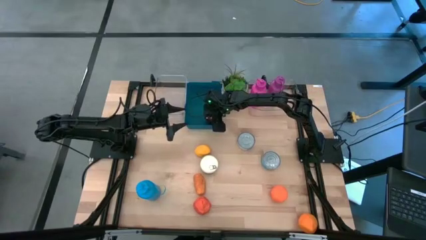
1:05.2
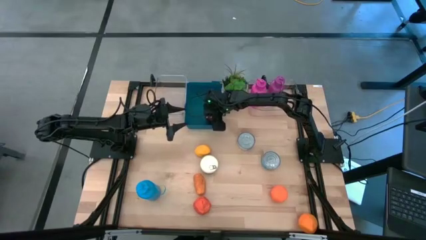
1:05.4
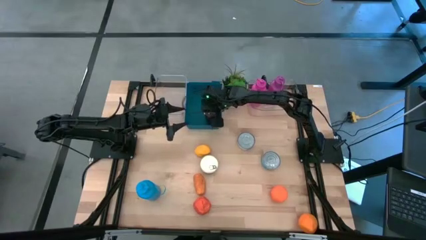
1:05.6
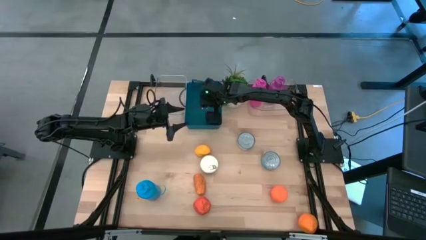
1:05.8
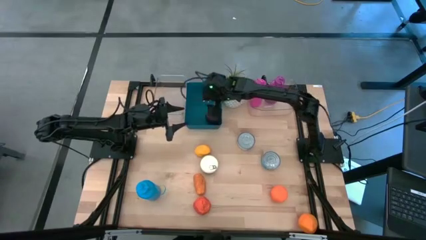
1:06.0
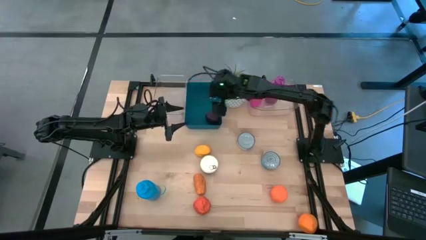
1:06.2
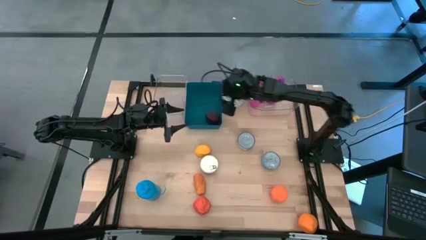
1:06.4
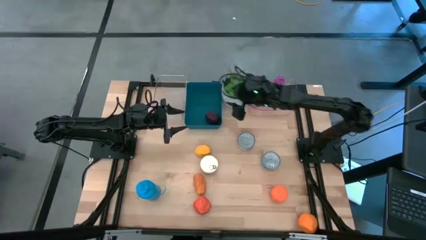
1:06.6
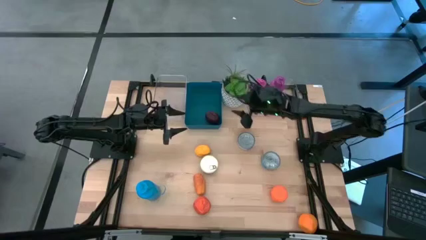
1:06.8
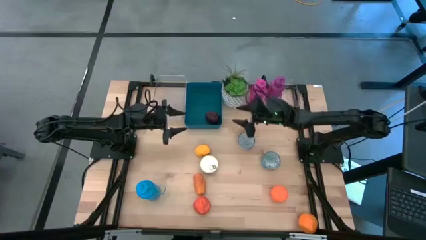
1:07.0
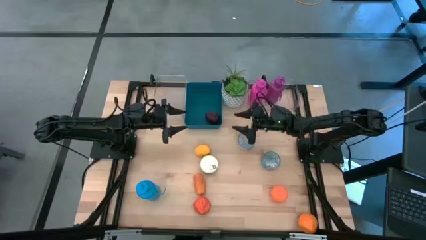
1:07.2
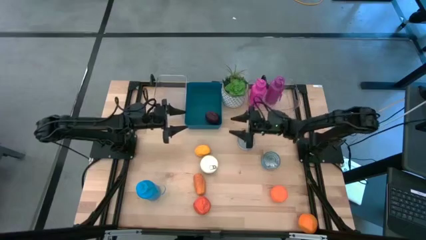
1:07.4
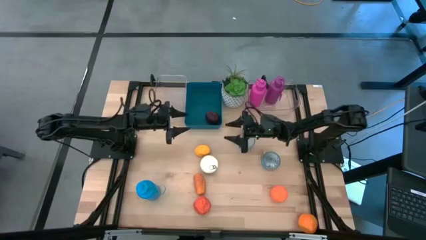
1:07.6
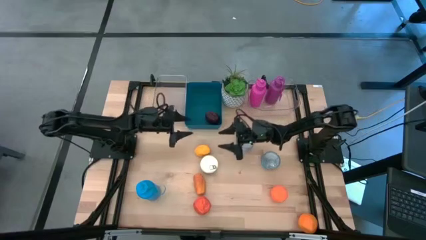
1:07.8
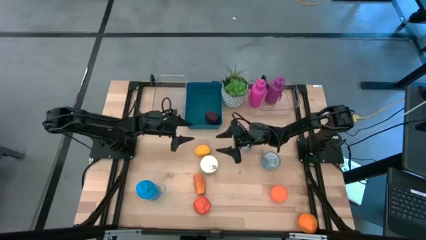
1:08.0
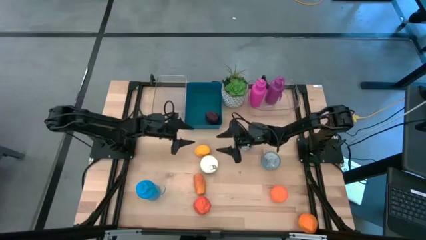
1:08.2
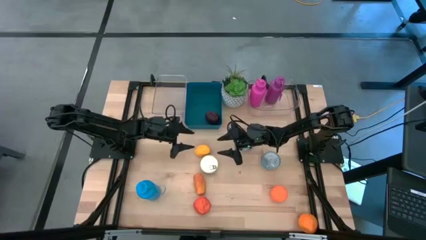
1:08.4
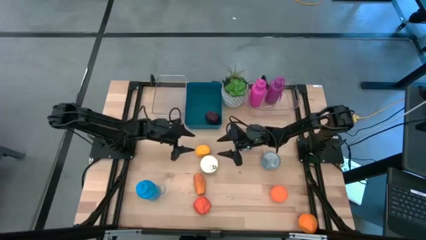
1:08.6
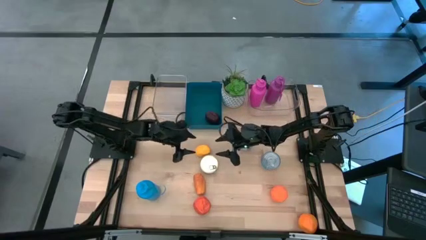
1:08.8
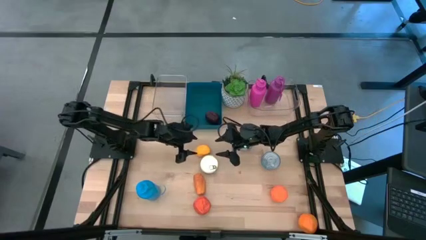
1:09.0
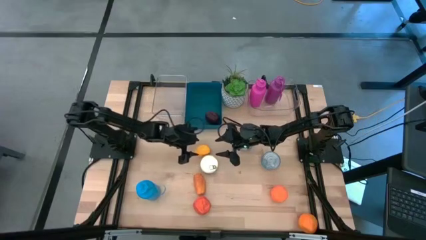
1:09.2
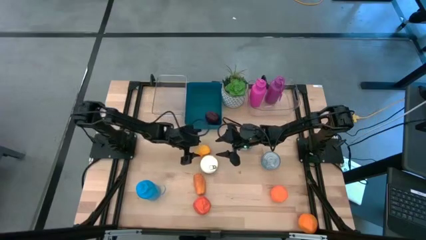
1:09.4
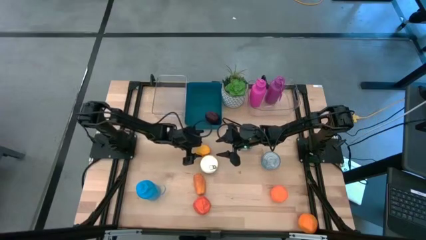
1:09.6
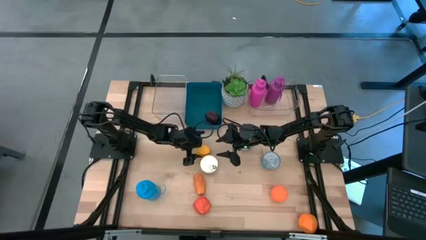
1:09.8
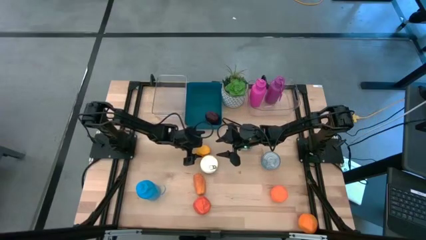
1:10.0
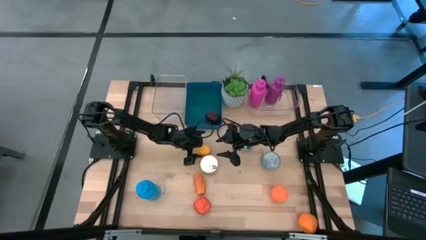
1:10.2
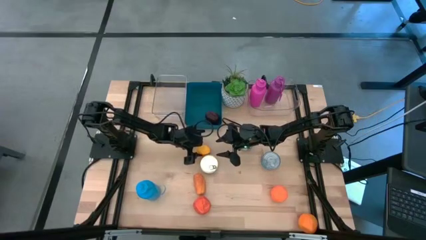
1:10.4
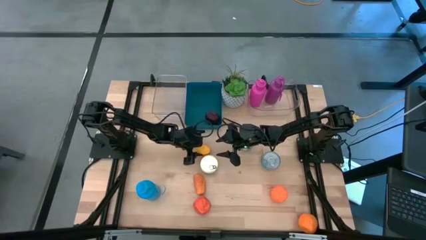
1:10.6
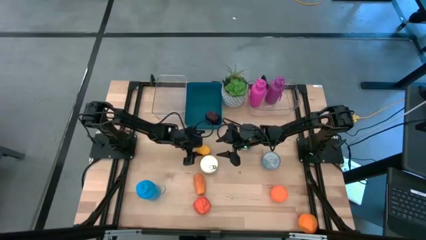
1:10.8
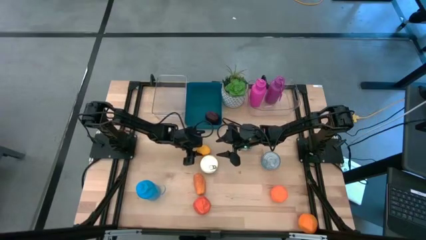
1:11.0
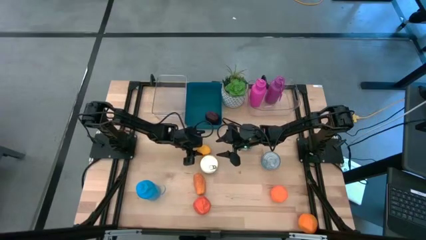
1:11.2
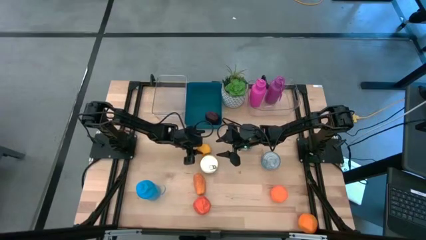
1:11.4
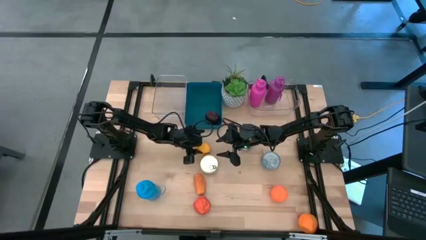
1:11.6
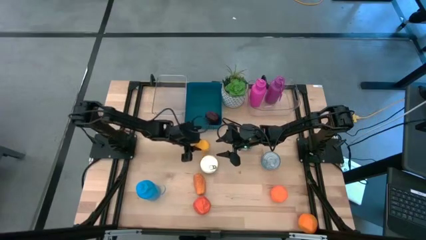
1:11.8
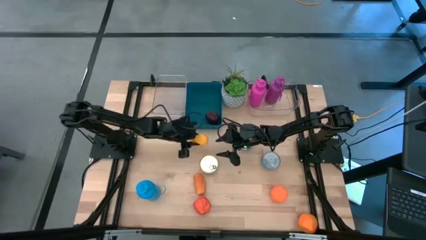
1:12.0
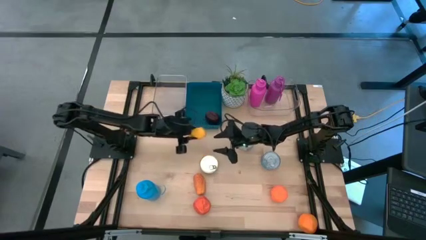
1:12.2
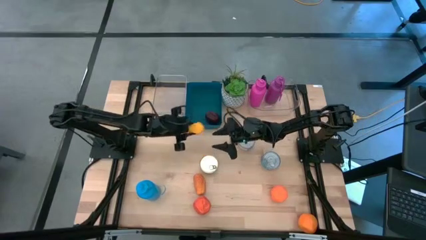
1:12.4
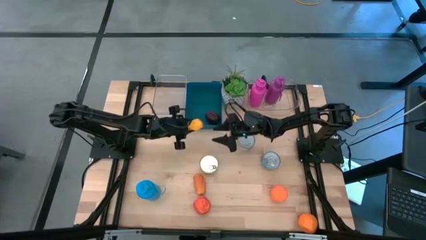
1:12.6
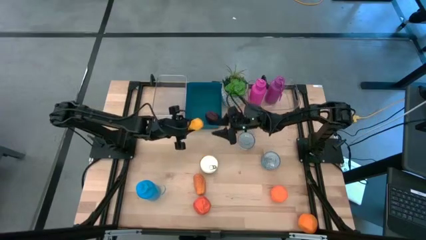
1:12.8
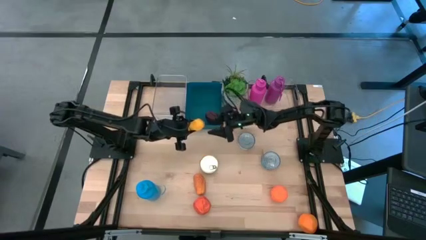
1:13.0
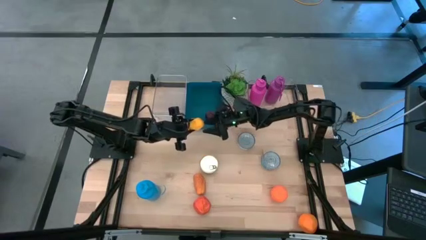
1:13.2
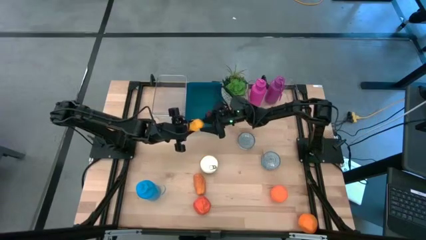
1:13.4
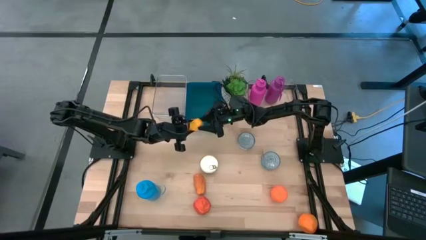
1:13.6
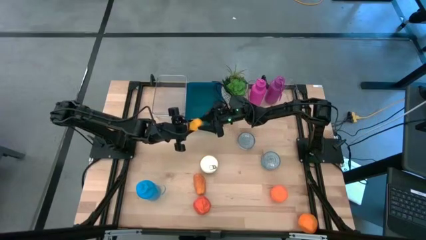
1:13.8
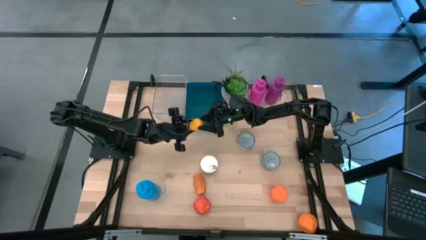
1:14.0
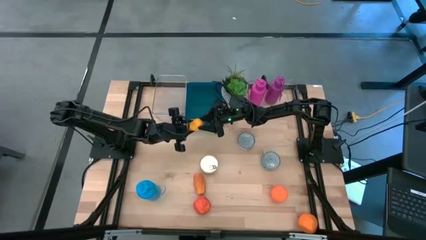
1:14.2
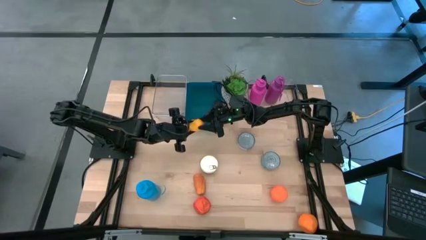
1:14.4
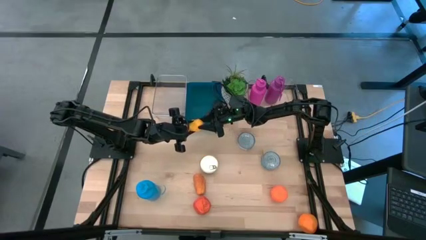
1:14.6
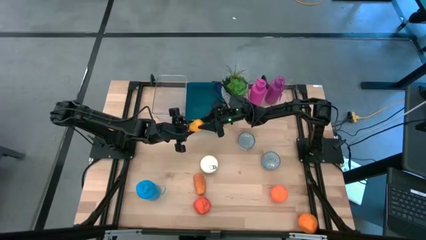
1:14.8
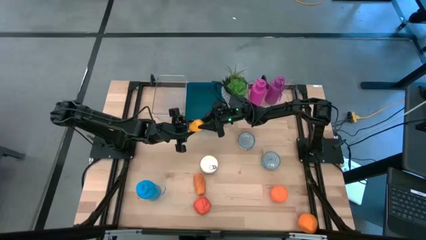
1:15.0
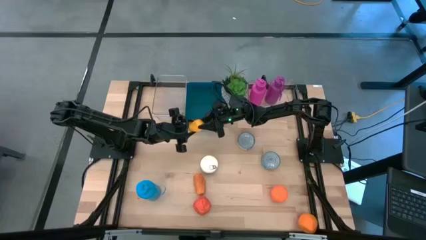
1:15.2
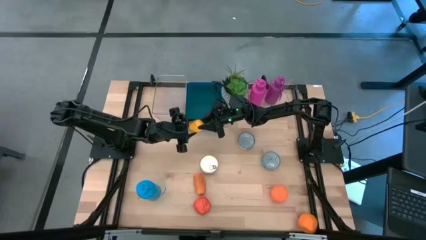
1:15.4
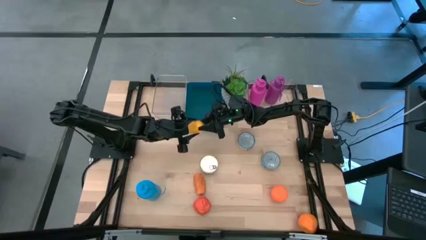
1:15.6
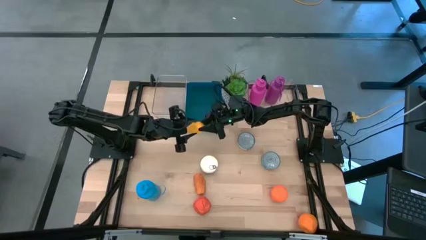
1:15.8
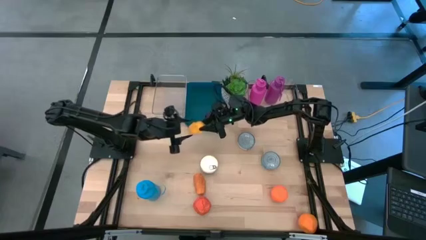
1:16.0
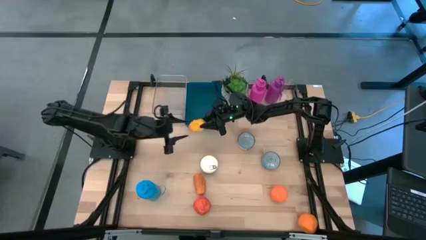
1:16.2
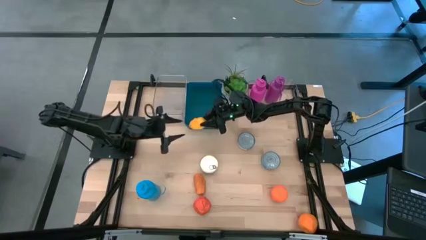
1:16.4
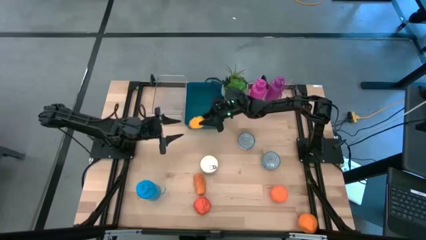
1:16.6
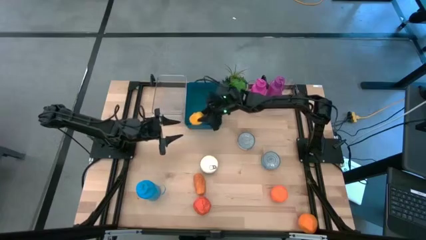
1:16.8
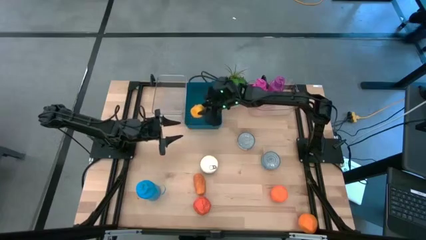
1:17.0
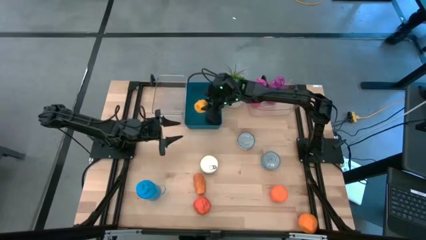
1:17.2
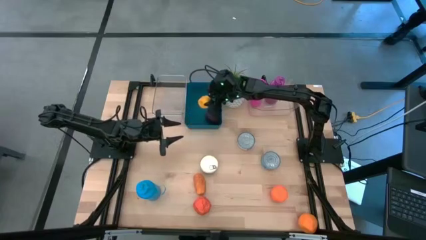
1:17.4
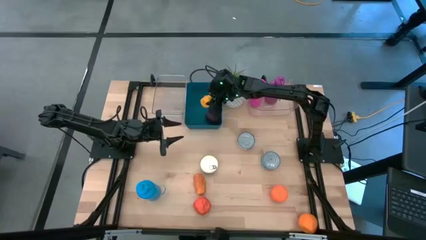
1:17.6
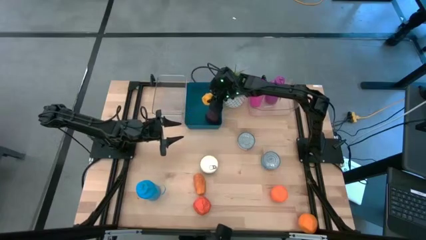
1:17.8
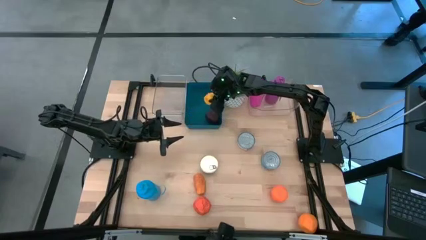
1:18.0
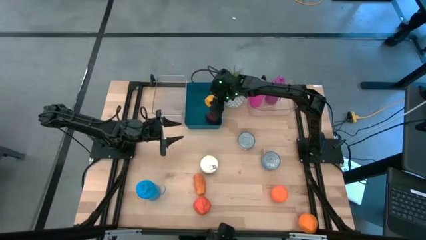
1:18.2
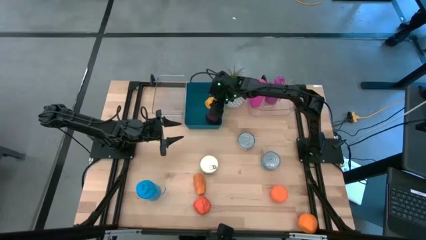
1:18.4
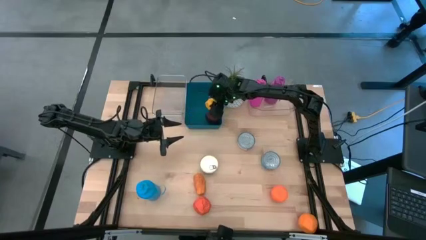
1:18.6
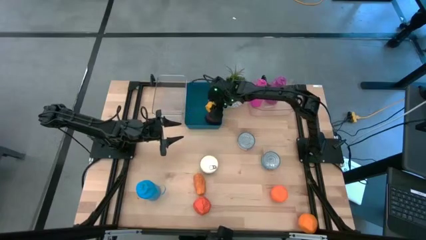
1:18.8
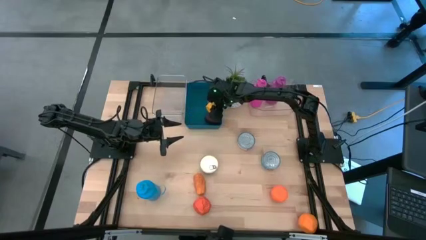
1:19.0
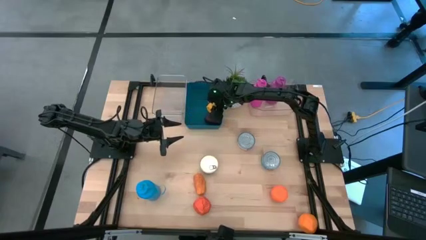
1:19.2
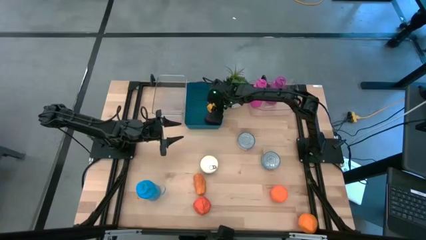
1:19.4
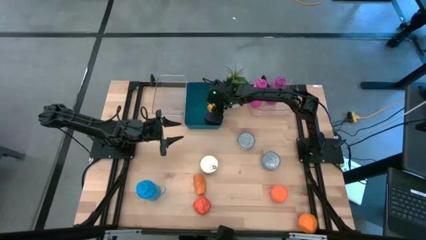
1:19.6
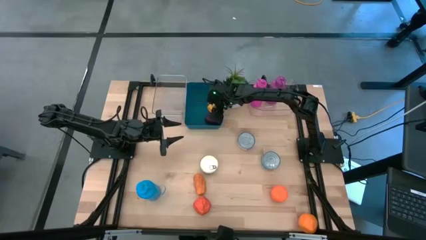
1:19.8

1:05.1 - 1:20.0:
Task: Pick & Place Food Item
Put the lemon into the blue bin

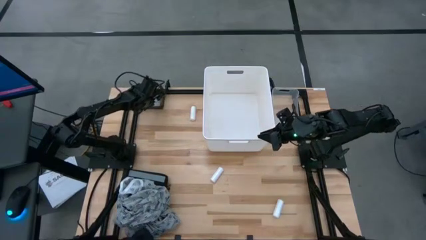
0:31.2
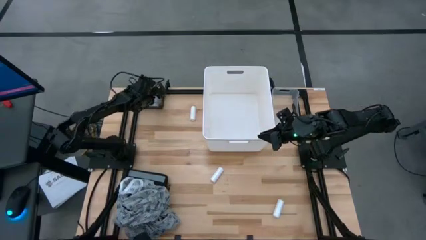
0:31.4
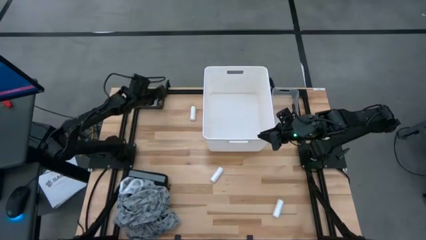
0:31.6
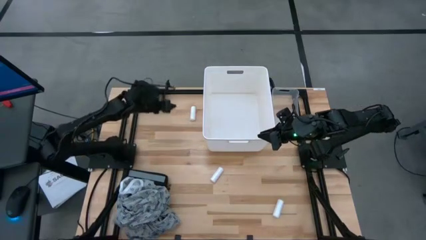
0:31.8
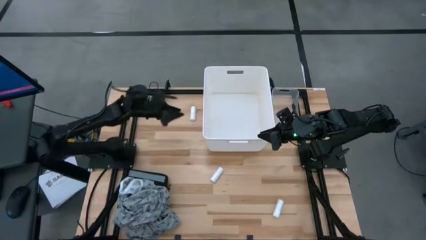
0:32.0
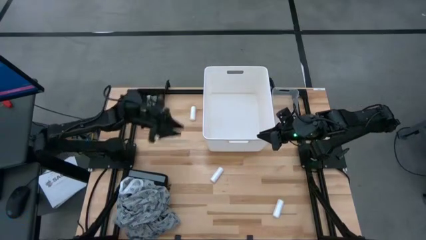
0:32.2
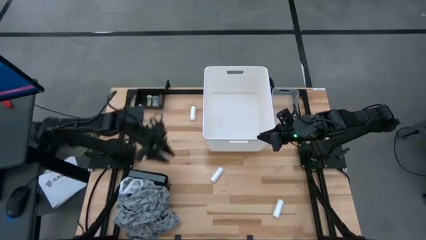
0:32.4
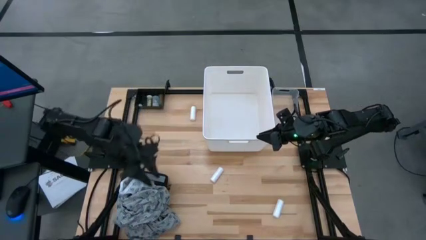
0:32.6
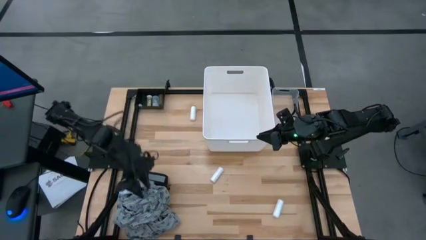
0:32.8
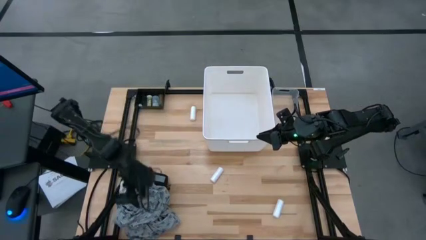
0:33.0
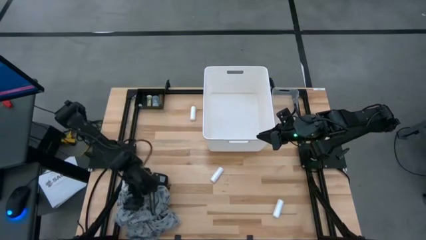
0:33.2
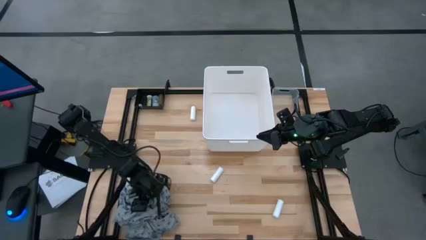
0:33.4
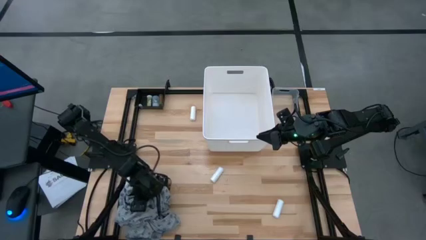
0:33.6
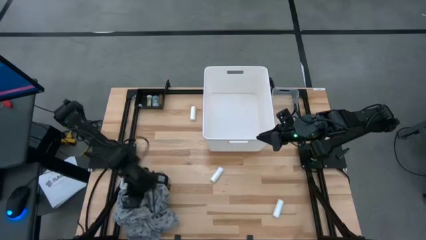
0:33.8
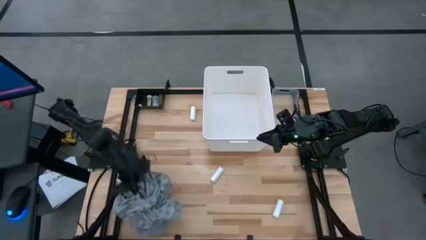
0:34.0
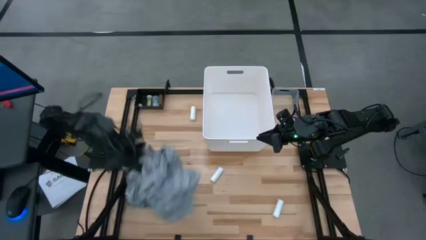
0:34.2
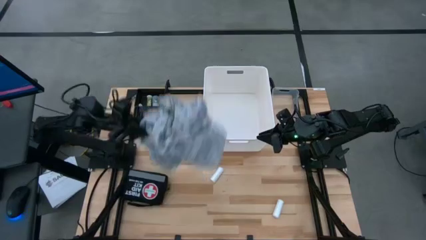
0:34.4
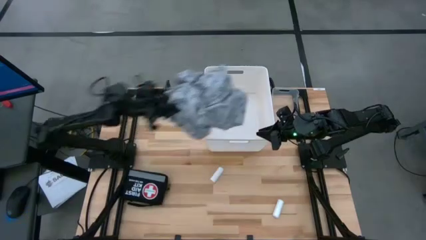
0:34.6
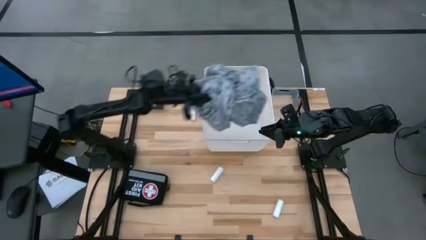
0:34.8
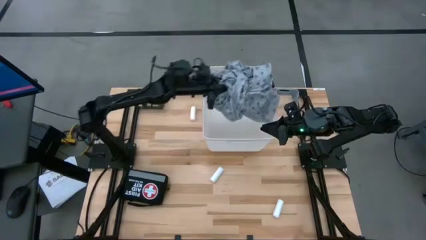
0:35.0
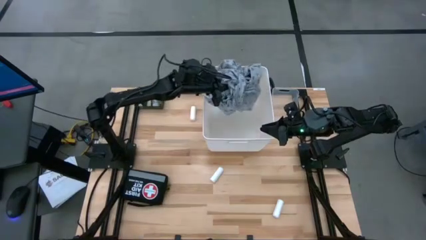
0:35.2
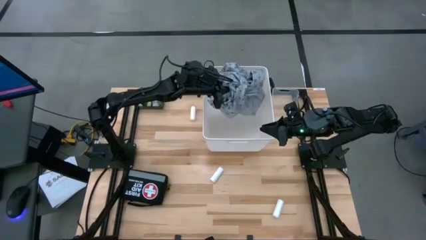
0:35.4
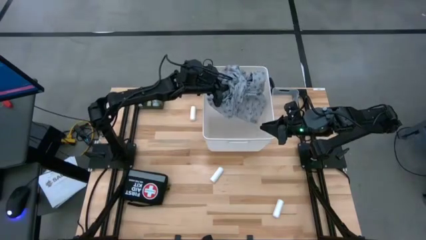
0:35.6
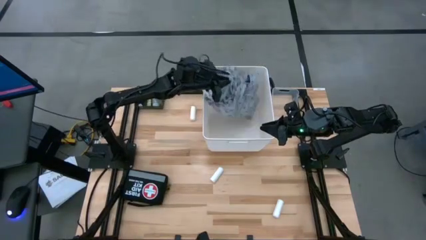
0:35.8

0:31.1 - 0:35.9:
Task: Pick & place medical supplies in basket/bin
Put the blue gown in the white bin
